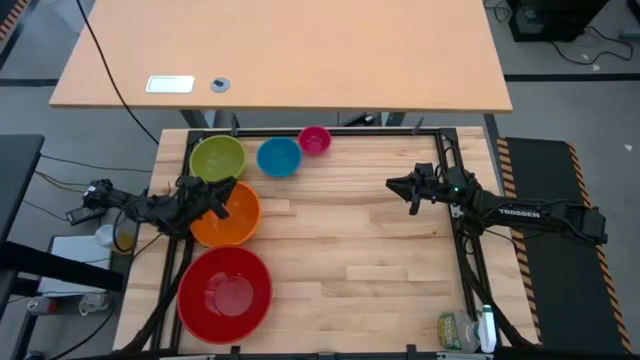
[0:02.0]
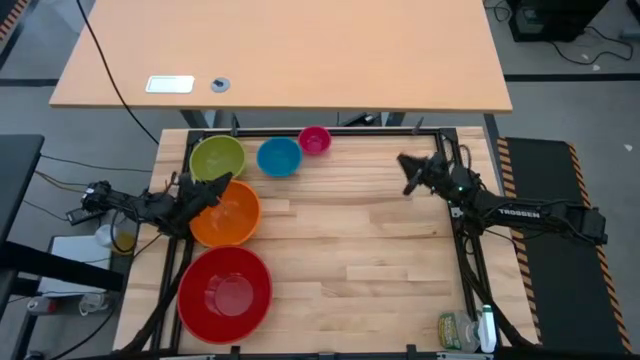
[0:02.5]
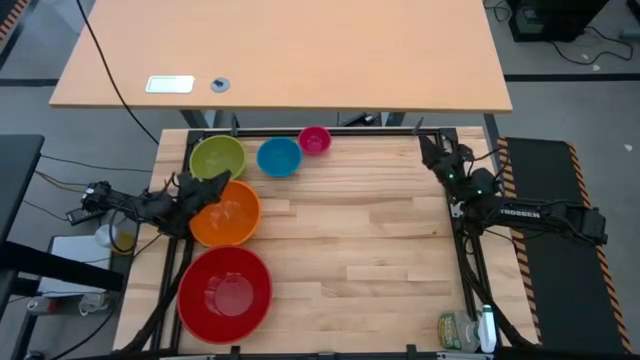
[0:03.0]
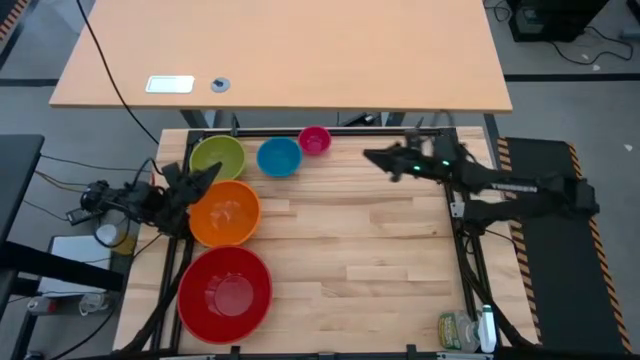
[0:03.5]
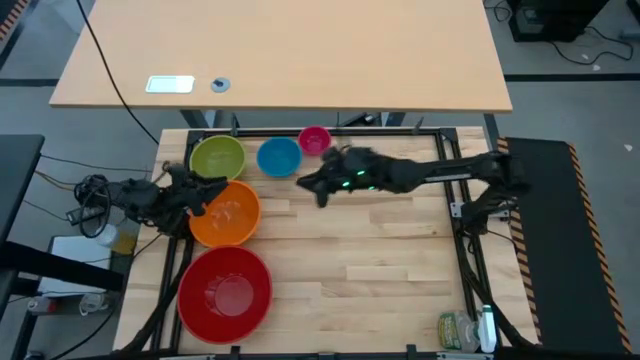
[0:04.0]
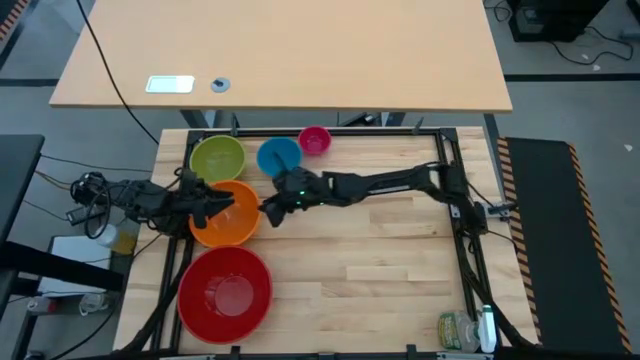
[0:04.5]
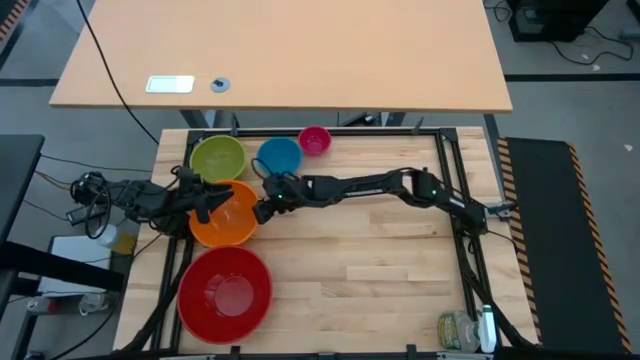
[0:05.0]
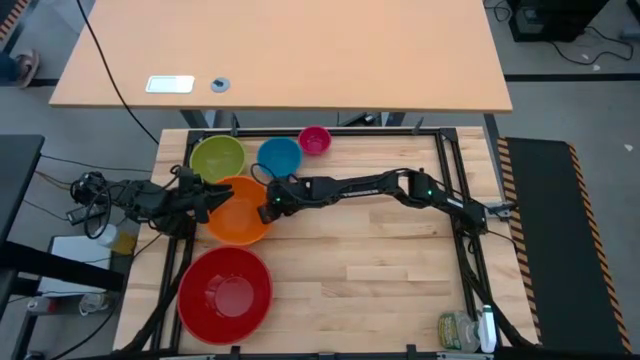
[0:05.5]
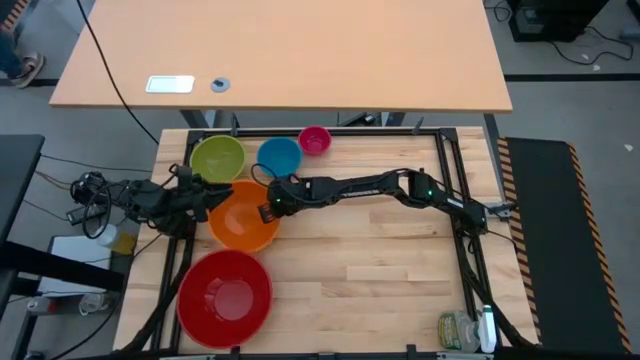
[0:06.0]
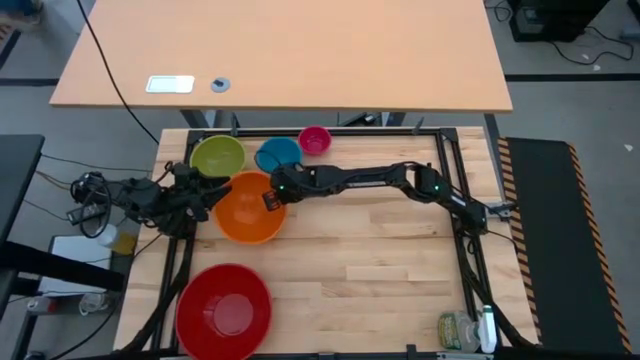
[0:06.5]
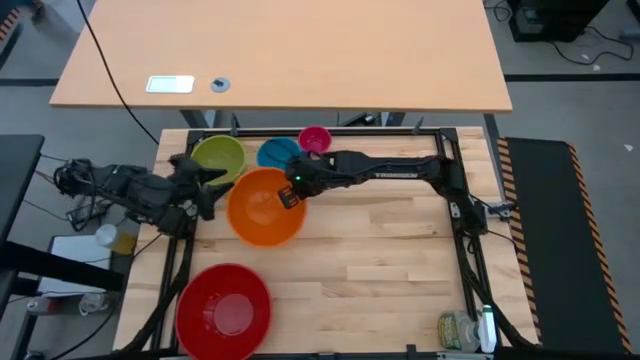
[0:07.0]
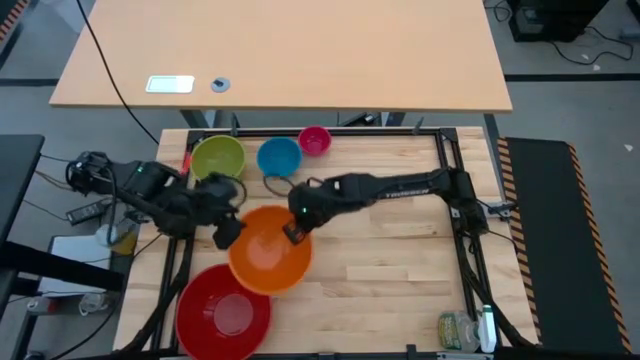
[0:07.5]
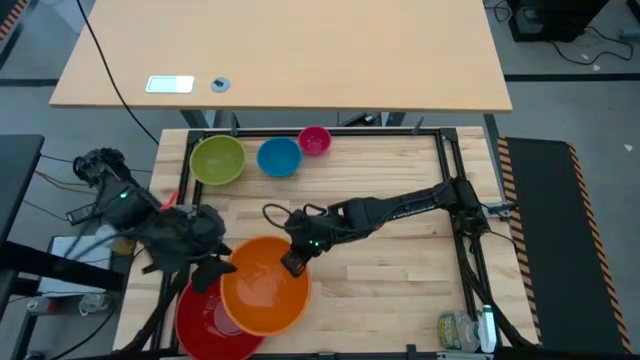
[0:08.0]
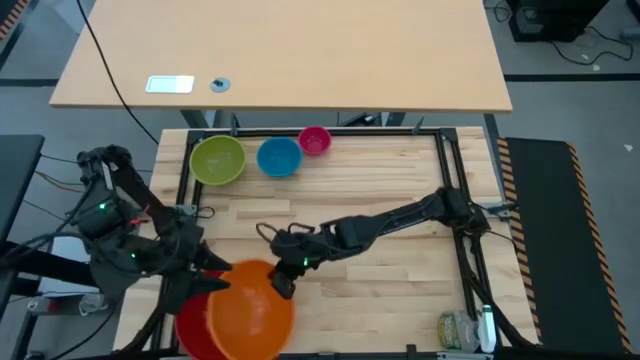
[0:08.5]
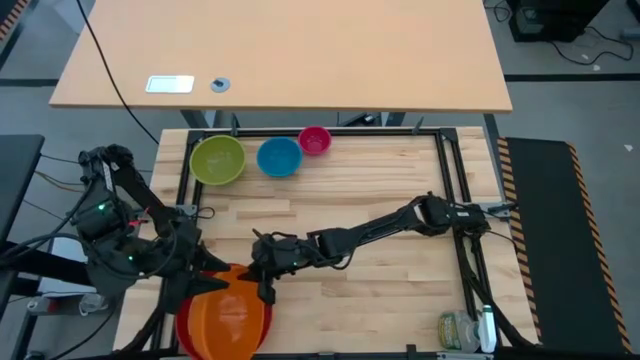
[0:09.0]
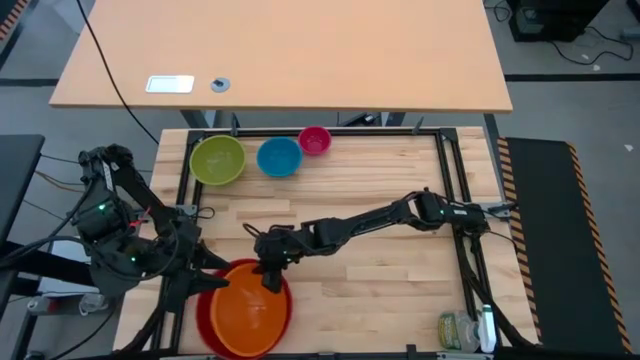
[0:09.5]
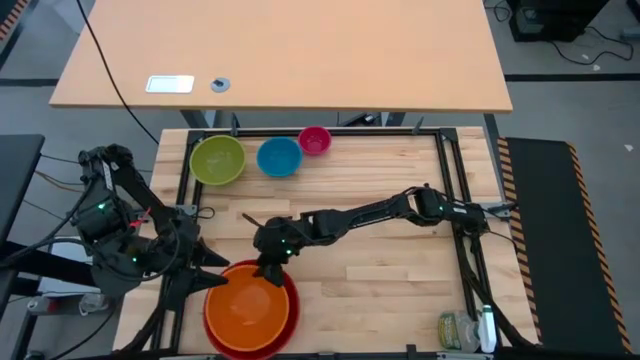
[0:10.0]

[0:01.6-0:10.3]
Stack the orange bowl on top of the red bowl

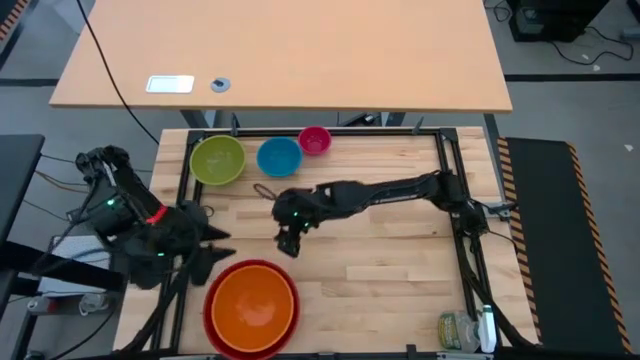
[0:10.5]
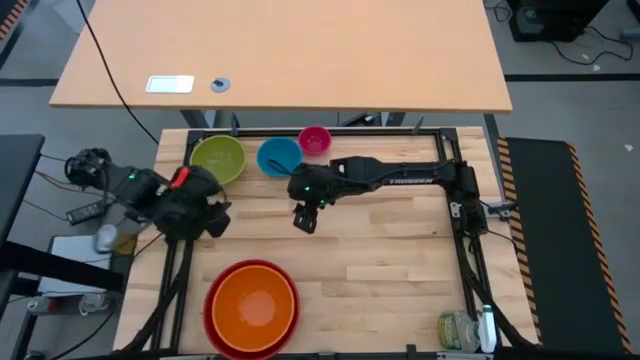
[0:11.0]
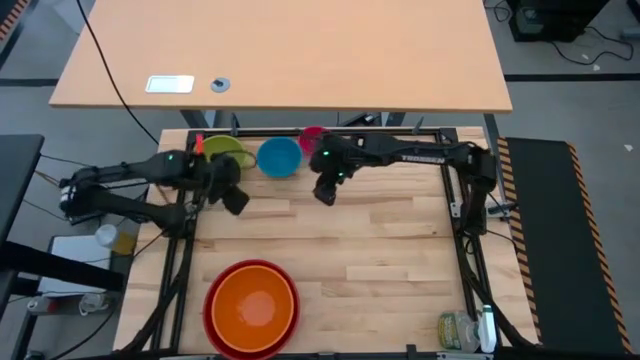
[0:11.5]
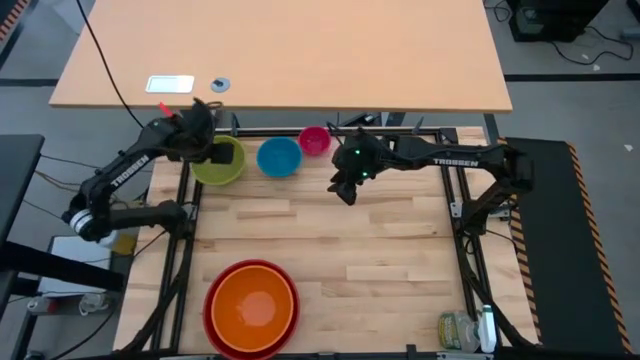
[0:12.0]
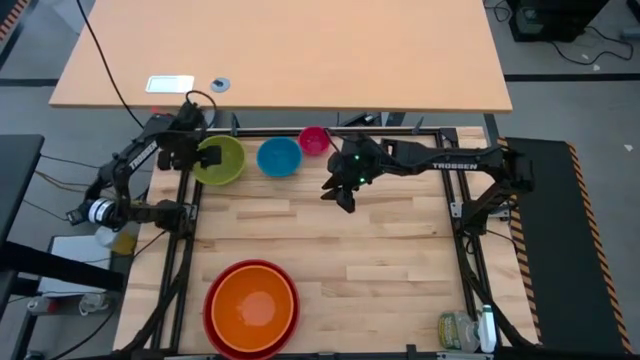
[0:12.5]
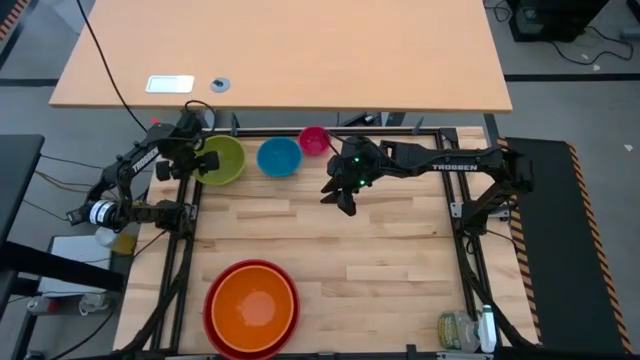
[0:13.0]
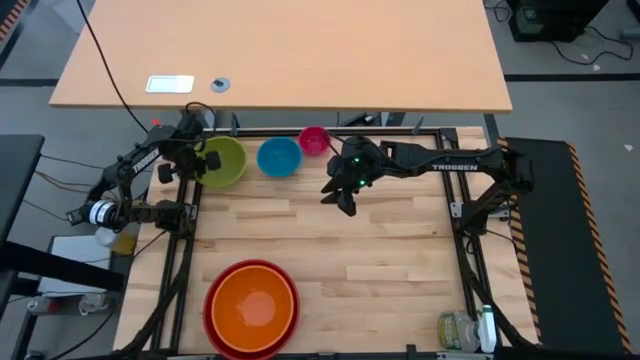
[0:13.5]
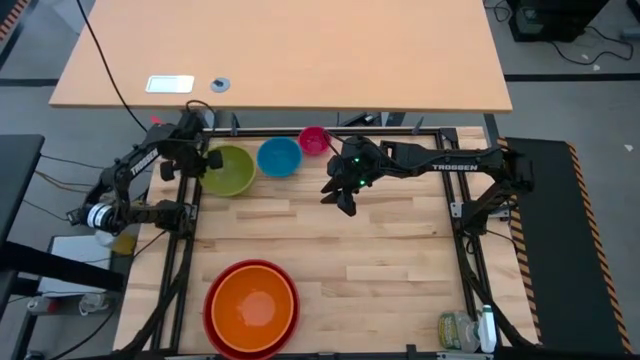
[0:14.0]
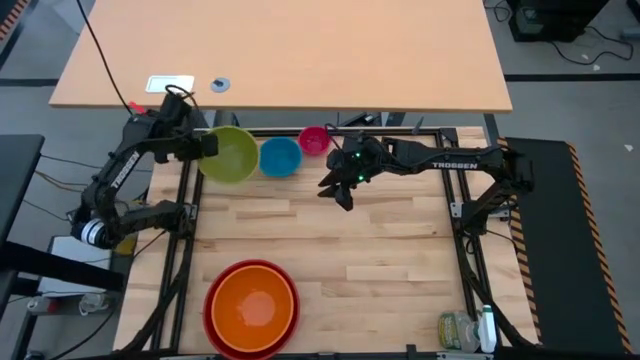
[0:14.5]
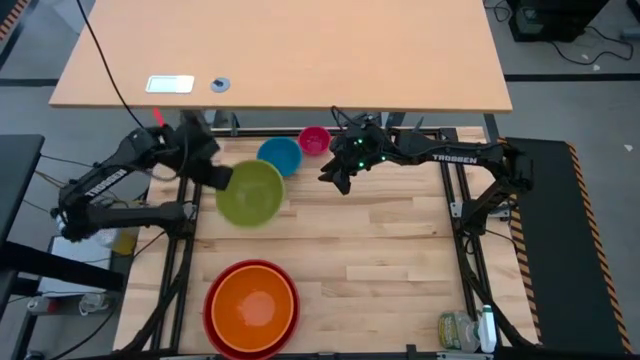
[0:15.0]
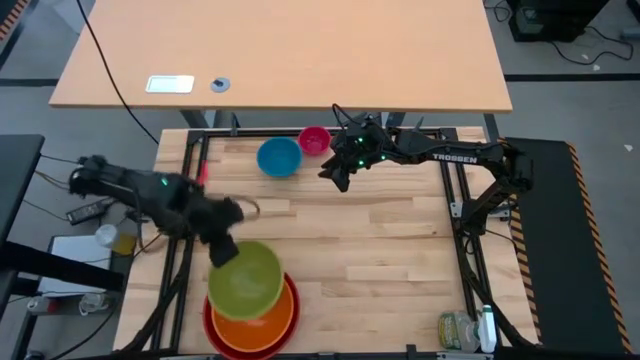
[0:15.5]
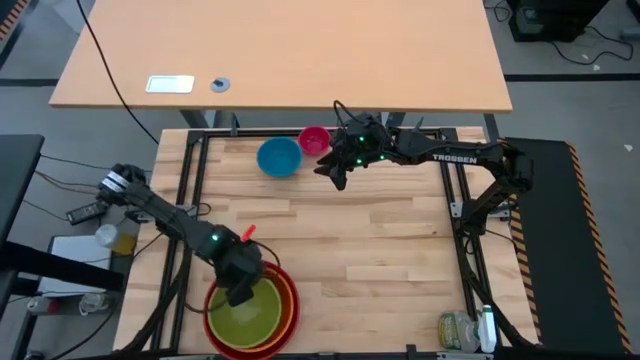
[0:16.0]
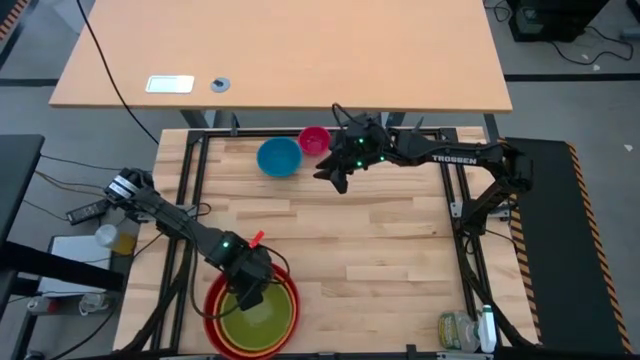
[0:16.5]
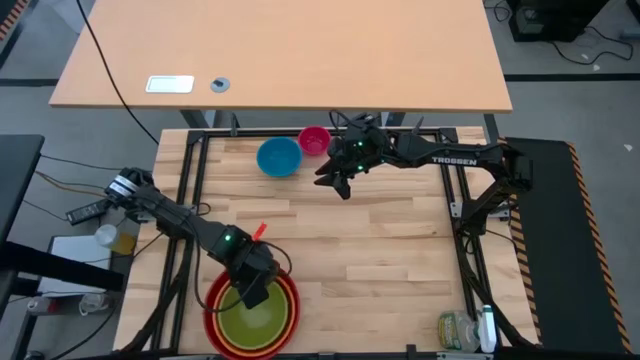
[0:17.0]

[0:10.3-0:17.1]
Stack the green bowl on top of the orange bowl

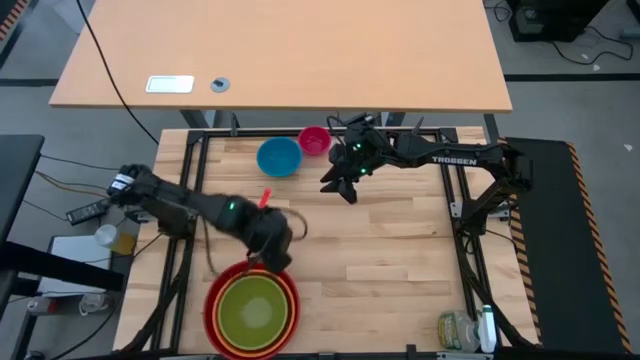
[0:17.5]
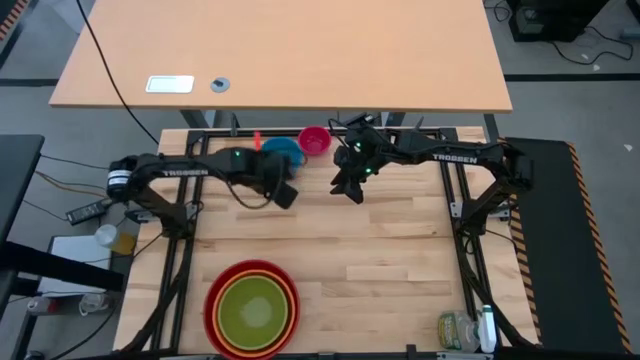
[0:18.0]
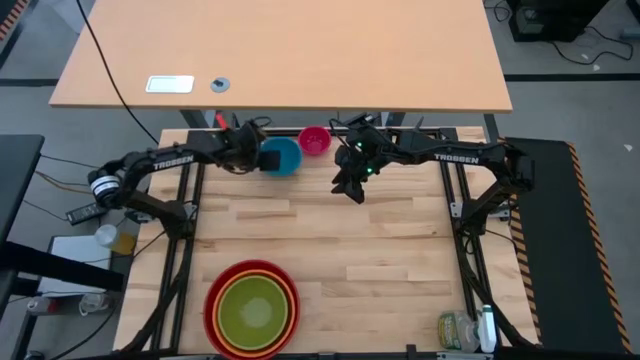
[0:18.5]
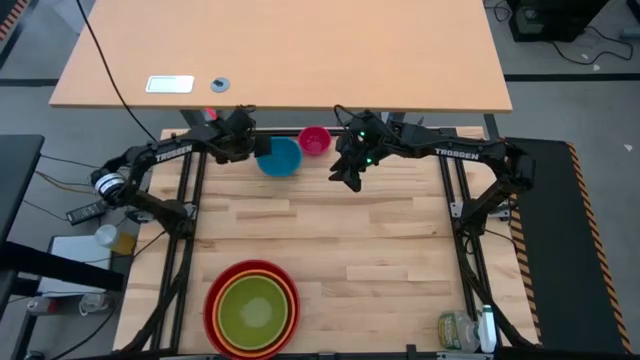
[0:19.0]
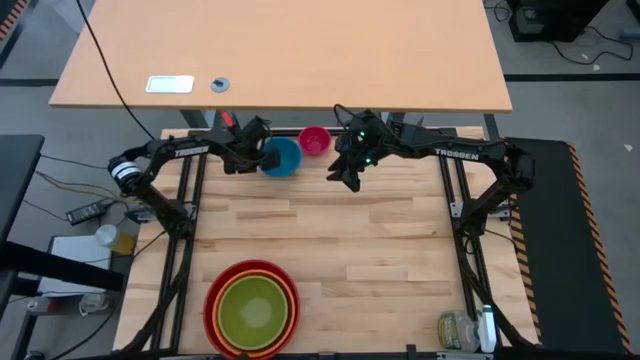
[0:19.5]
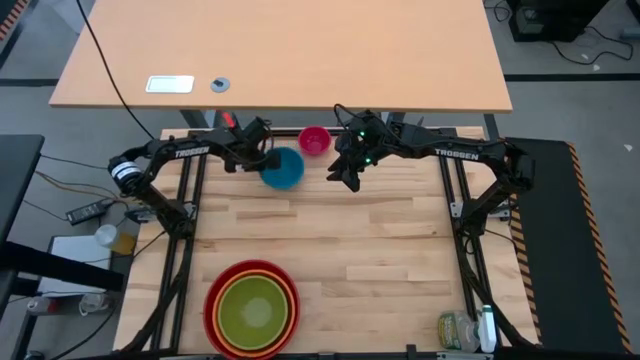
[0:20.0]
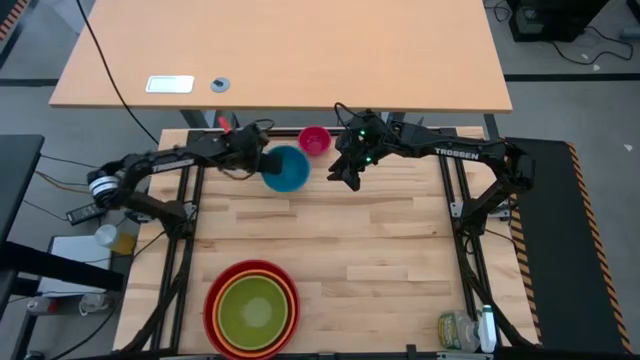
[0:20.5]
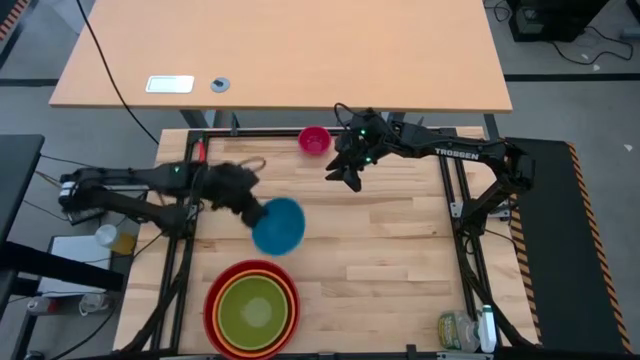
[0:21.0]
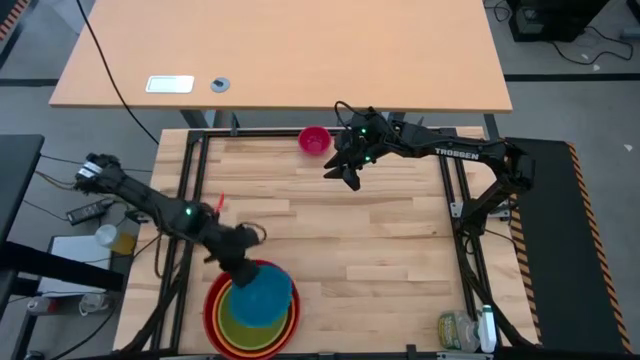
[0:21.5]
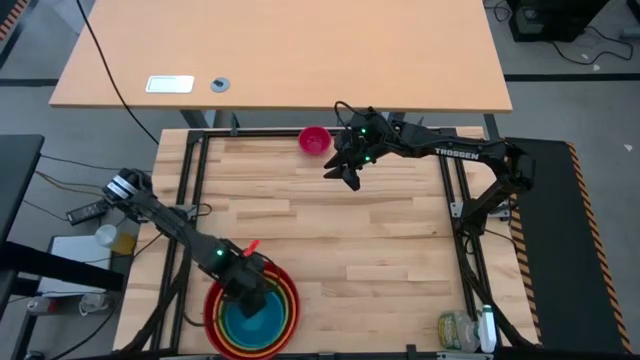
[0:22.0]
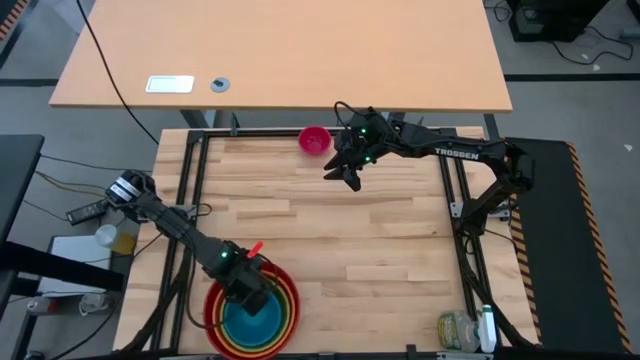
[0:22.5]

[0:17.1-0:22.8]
Stack the blue bowl on top of the green bowl
